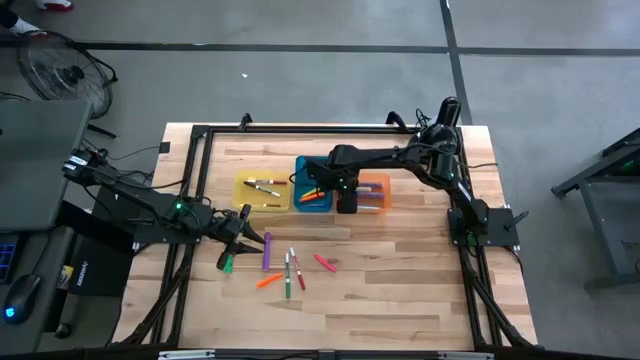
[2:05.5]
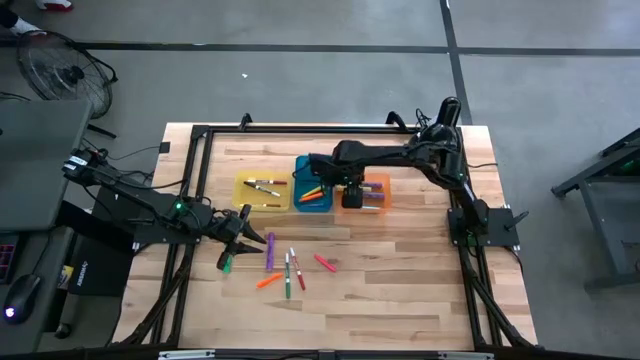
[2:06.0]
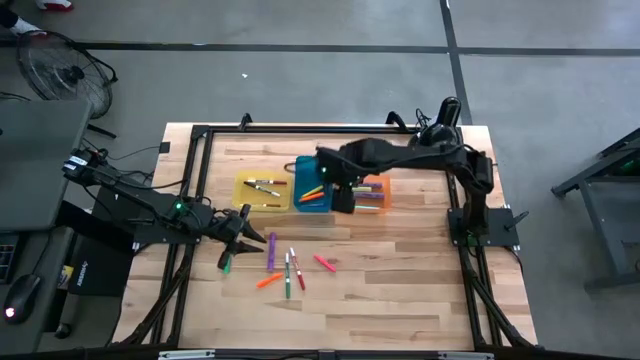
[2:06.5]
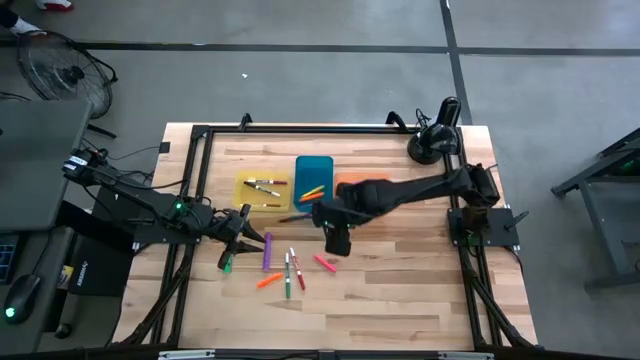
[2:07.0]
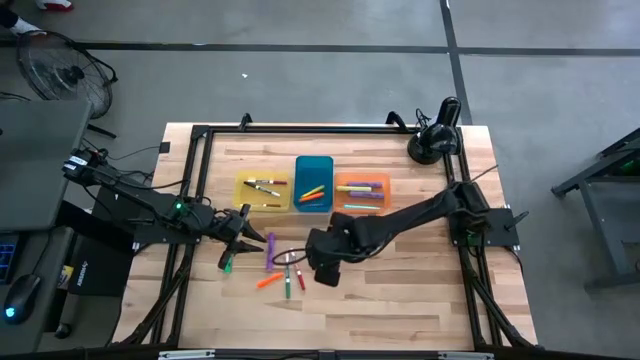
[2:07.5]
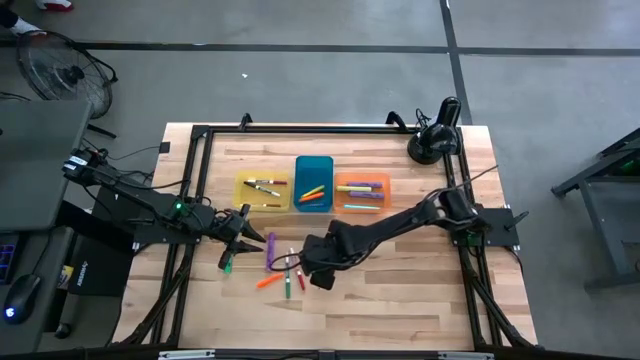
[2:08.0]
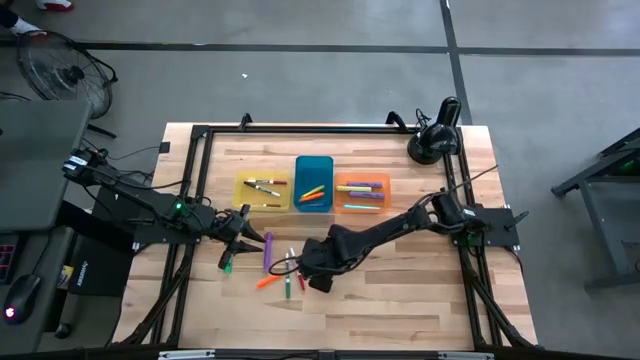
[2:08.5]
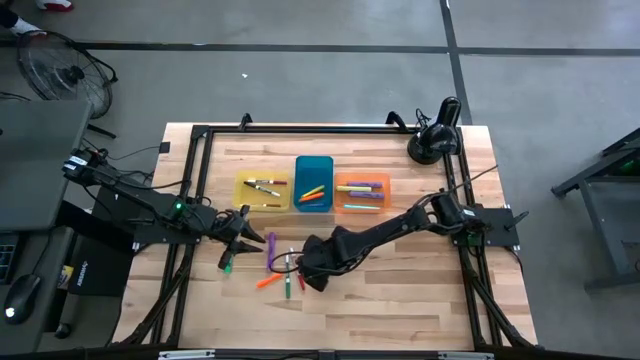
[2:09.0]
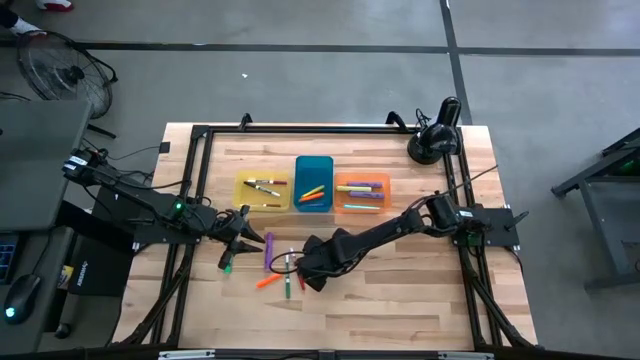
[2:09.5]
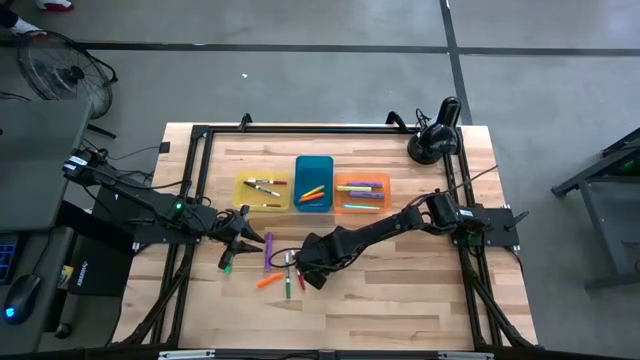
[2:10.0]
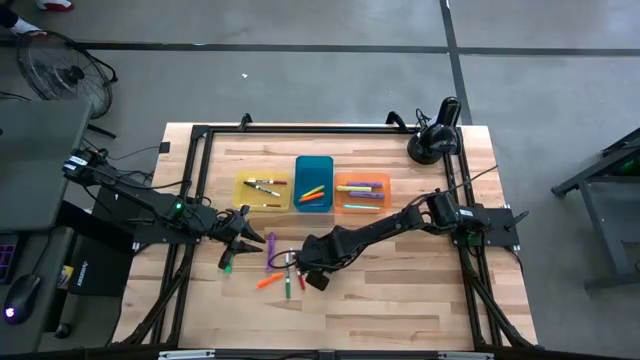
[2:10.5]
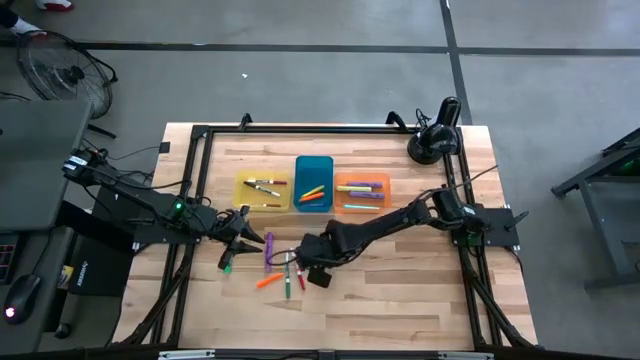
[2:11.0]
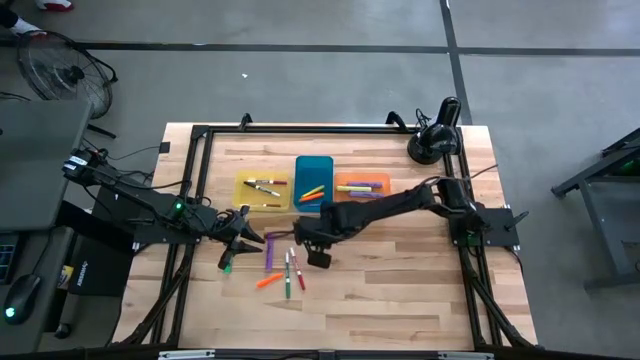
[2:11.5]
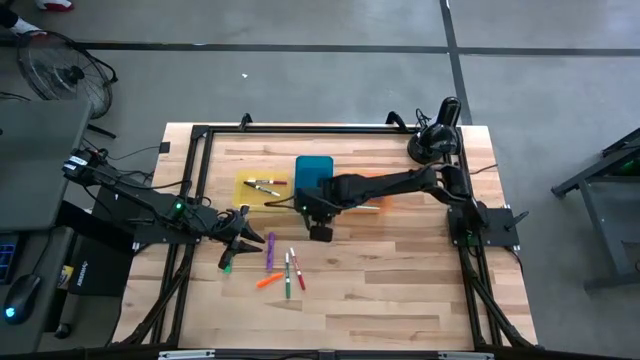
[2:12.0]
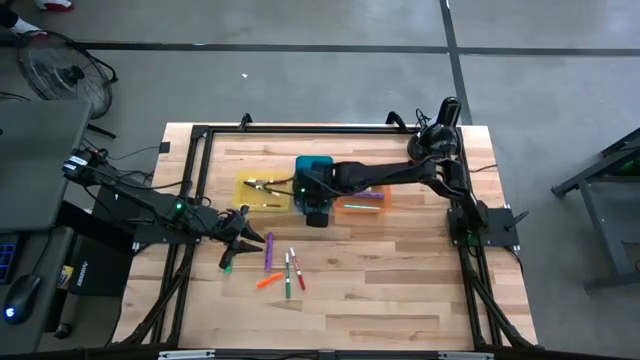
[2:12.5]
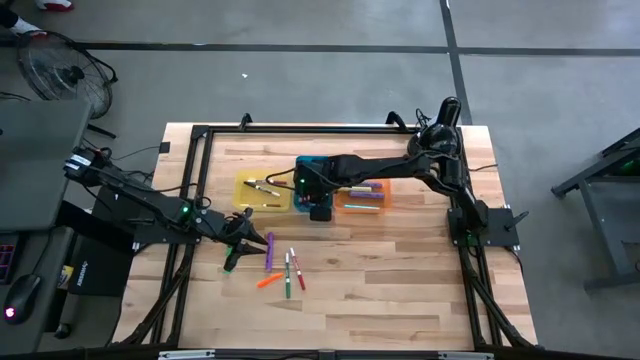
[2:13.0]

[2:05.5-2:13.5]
Task: Pick & Place Markers
Put the pink pen into the blue bin

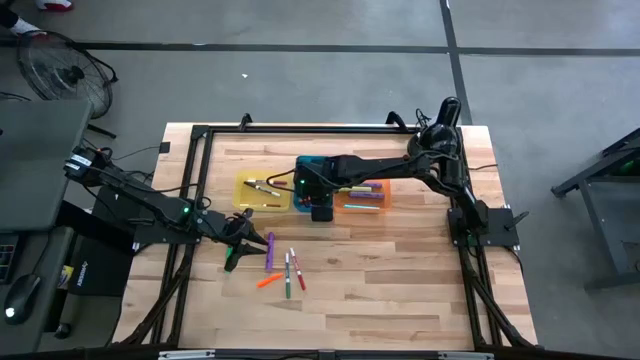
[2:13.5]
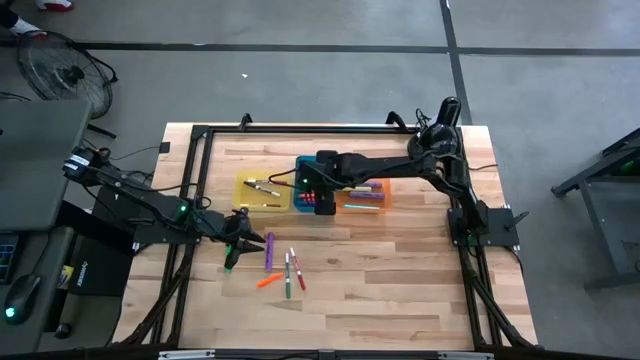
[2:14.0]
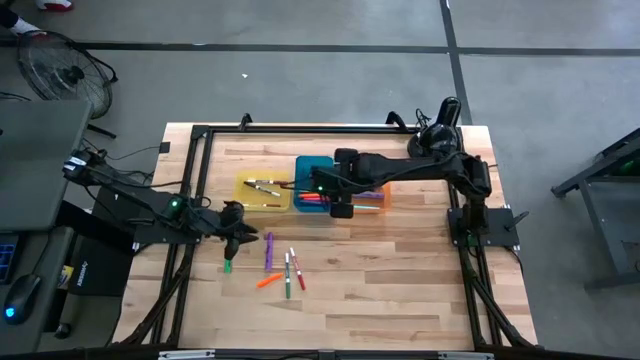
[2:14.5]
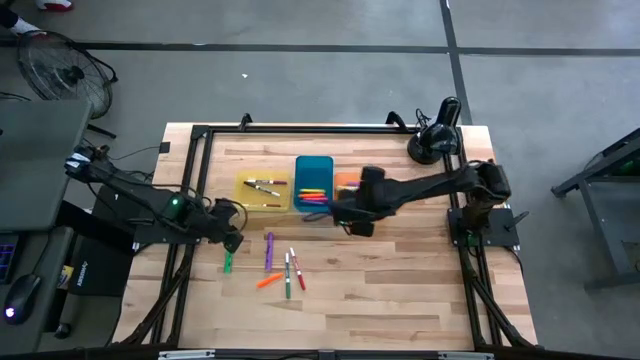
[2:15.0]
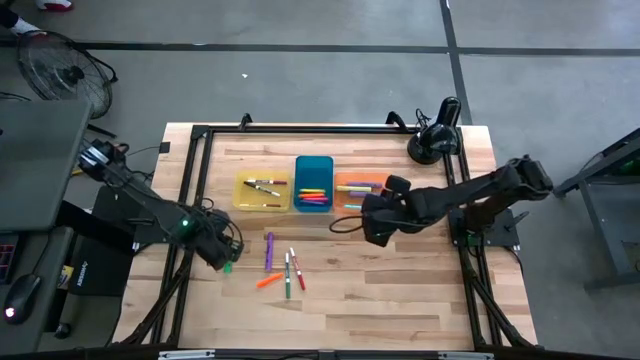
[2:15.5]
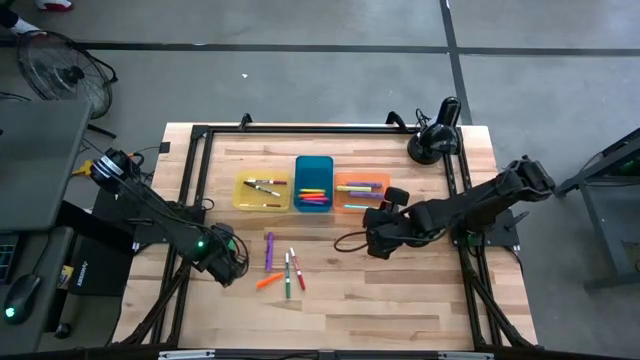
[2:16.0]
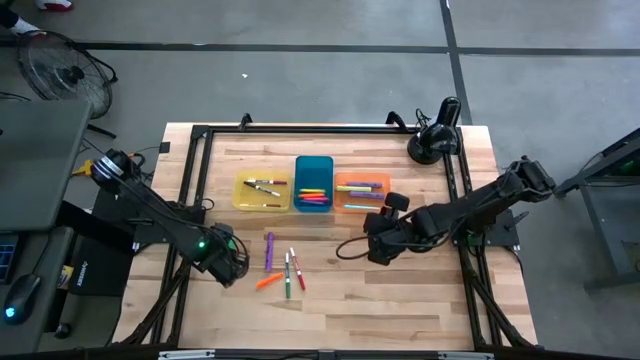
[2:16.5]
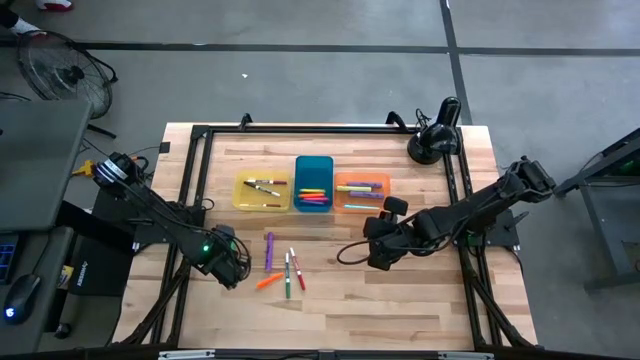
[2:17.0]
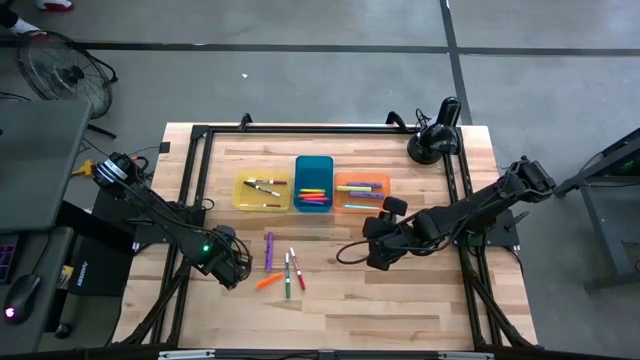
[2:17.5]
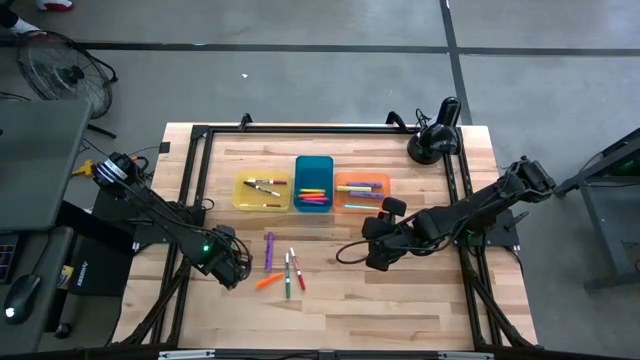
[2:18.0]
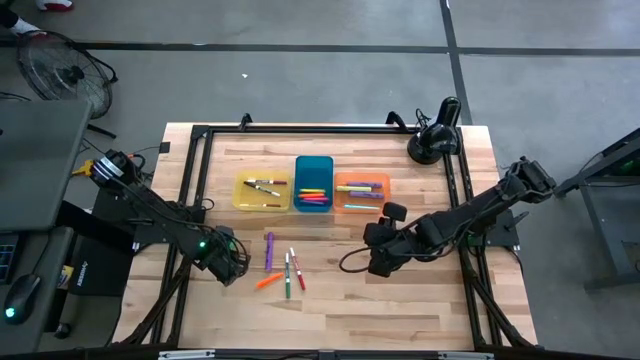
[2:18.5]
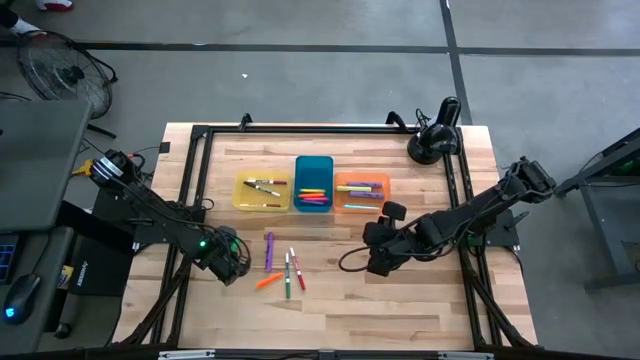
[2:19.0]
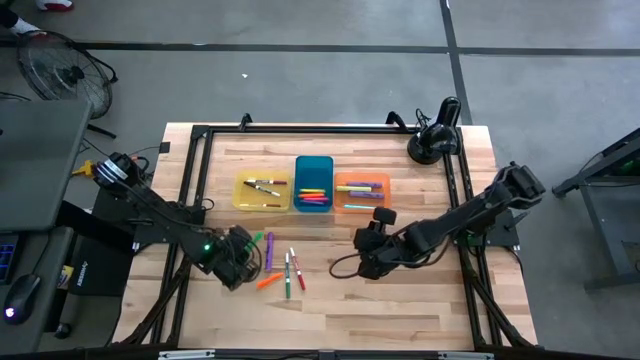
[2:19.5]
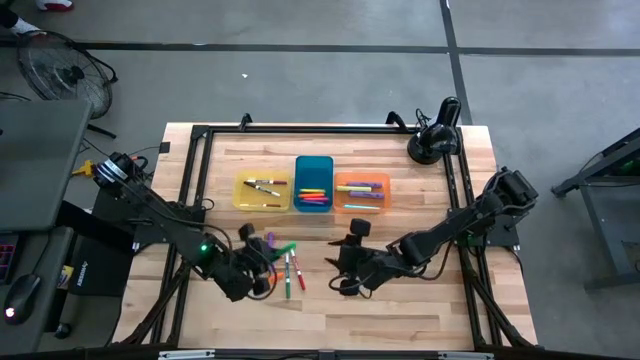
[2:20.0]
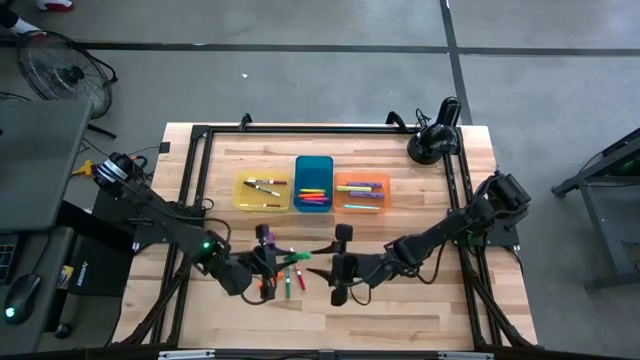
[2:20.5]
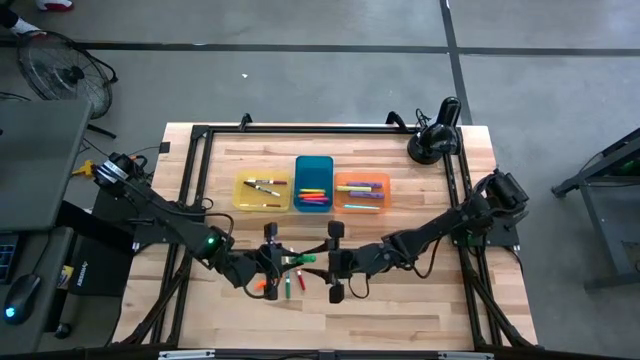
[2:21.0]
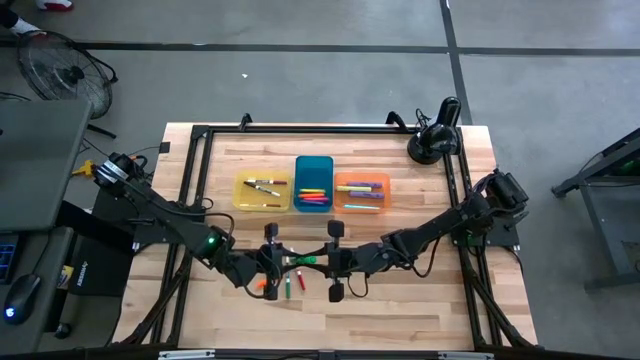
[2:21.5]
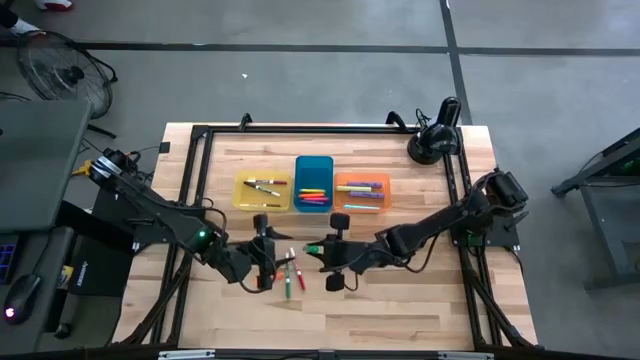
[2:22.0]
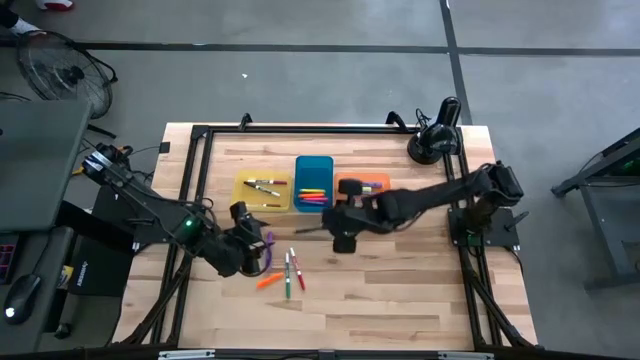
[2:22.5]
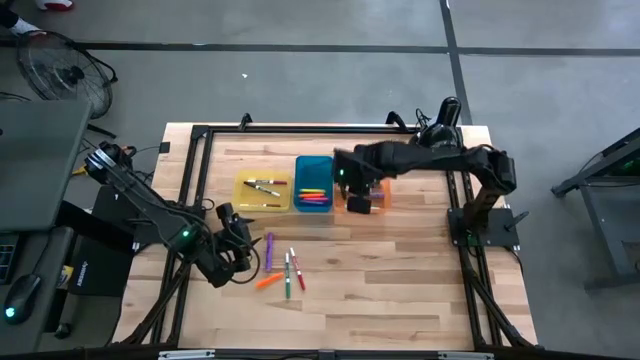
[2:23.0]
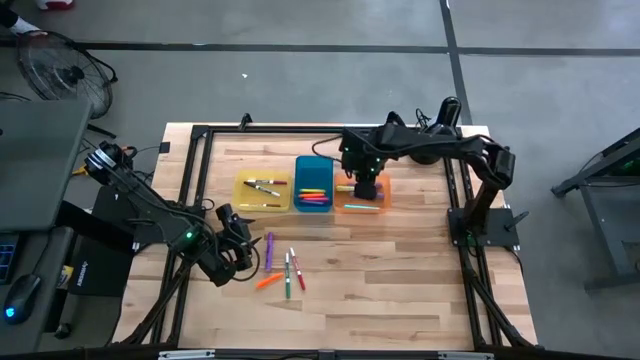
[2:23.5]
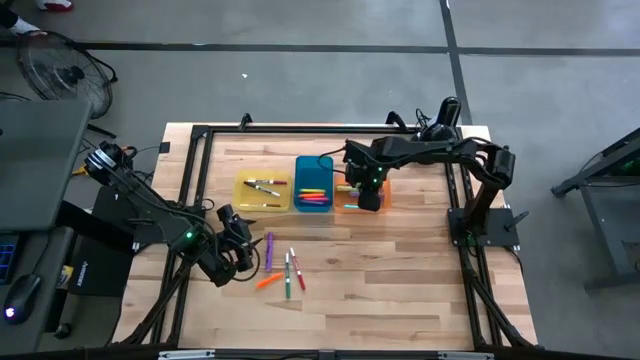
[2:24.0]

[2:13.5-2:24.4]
Put the green highlighter into the orange bin

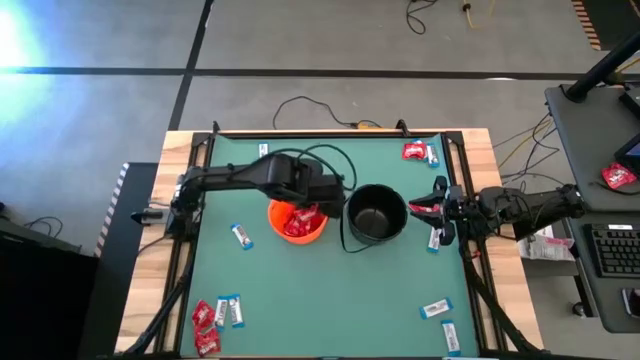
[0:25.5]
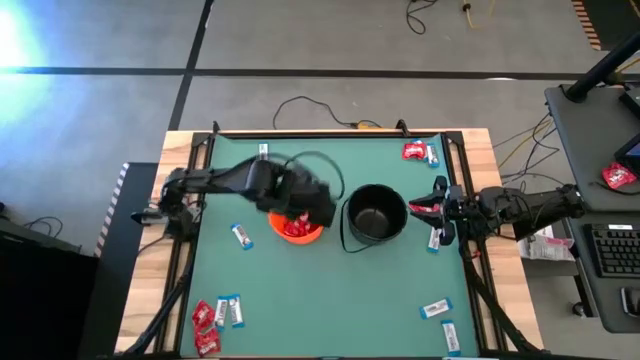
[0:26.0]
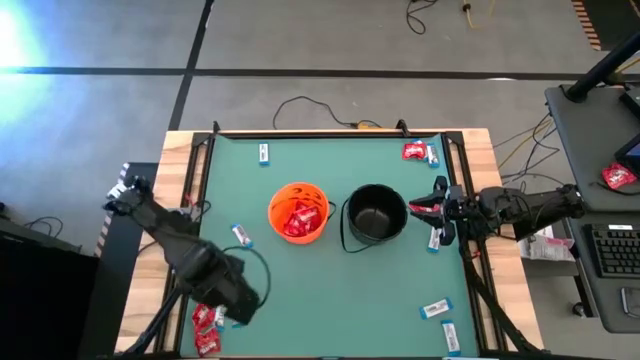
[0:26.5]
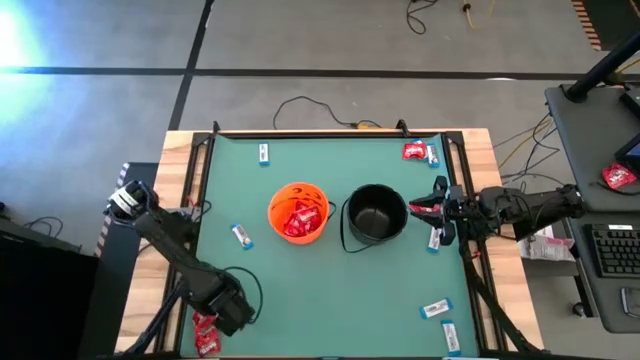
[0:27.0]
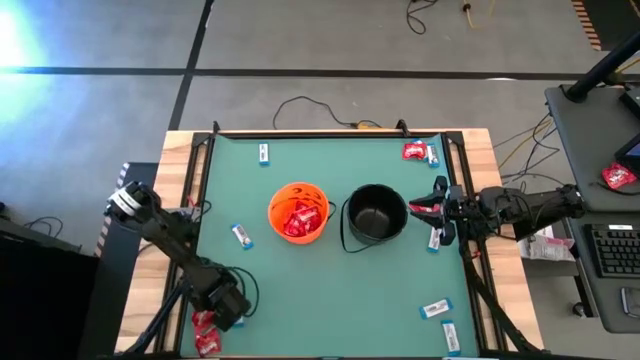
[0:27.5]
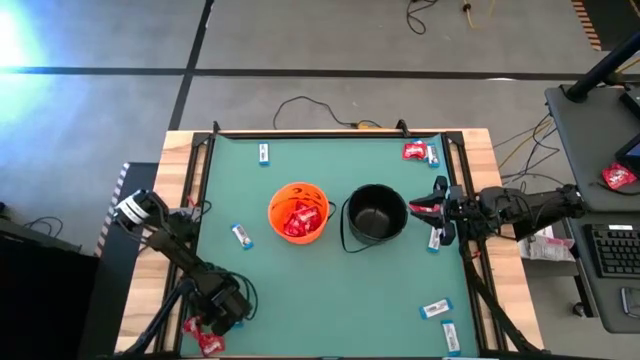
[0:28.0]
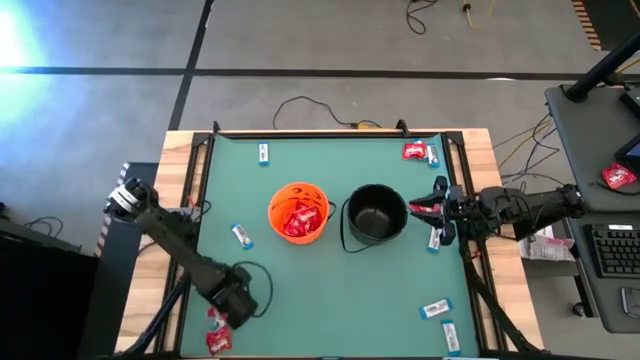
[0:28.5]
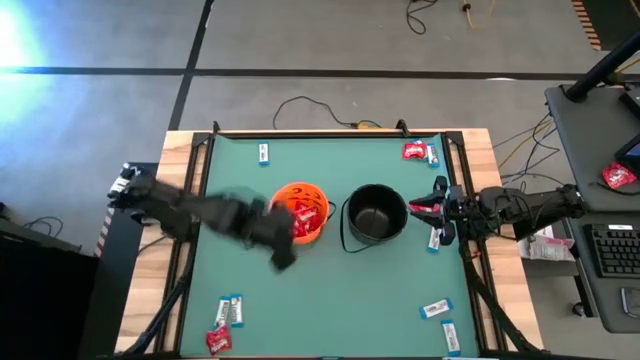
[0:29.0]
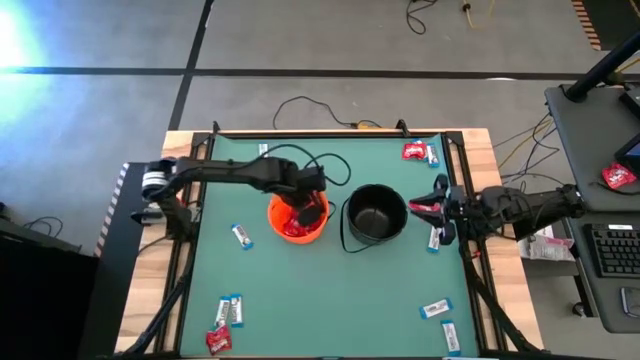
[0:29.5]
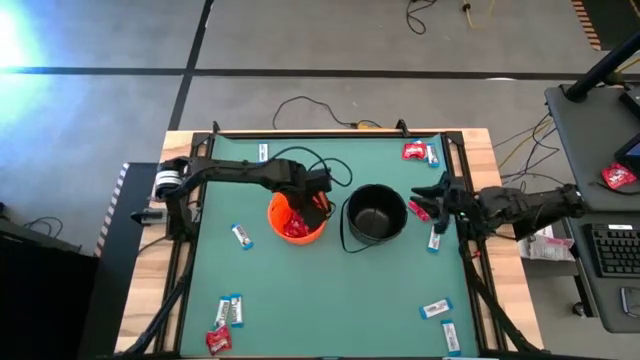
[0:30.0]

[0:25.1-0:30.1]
Task: Sort candy by brand, put in halloween buckets
Put the red candy into the orange bucket
